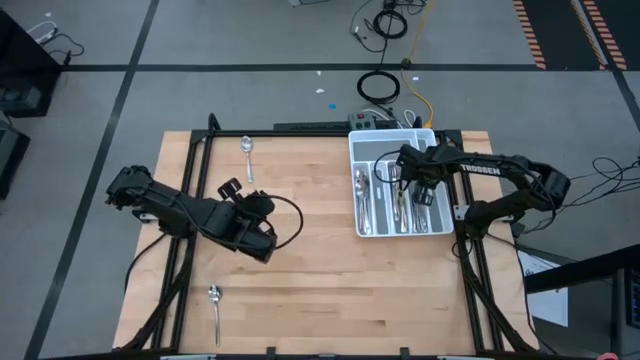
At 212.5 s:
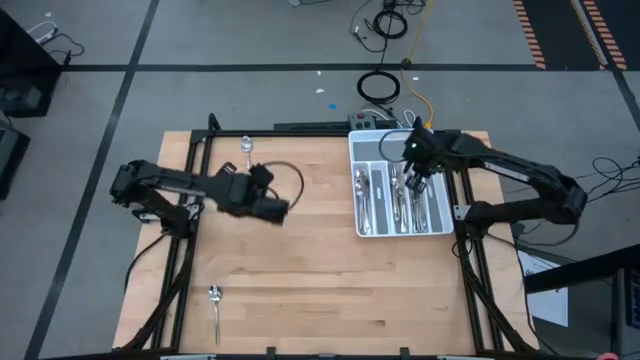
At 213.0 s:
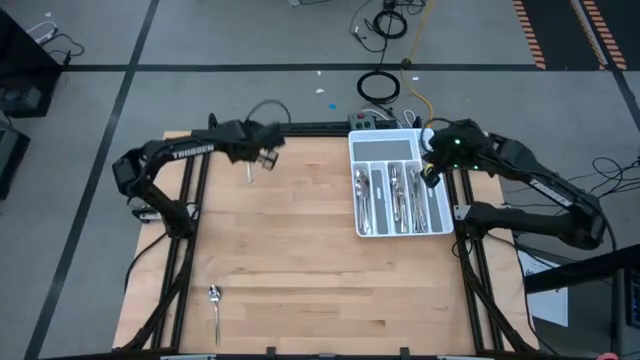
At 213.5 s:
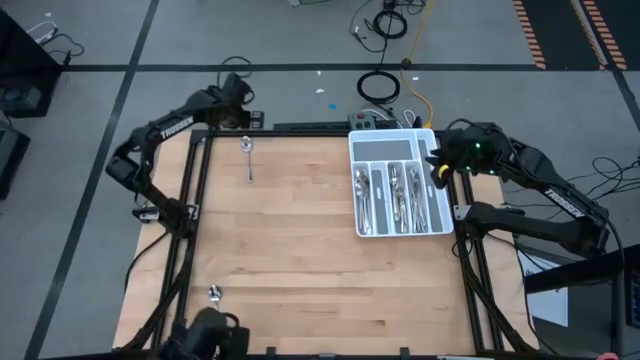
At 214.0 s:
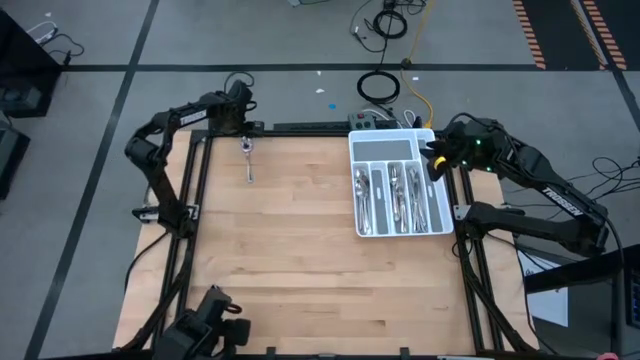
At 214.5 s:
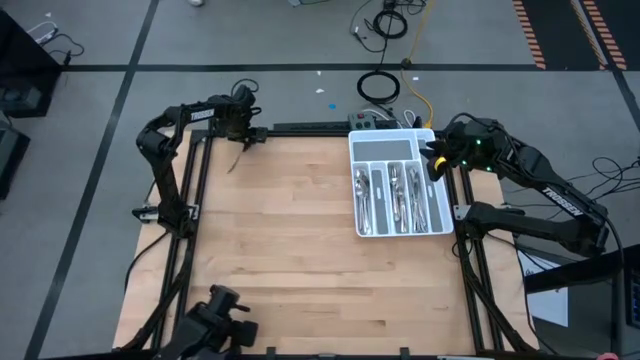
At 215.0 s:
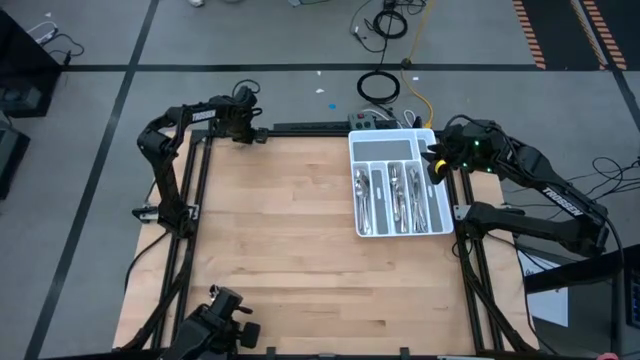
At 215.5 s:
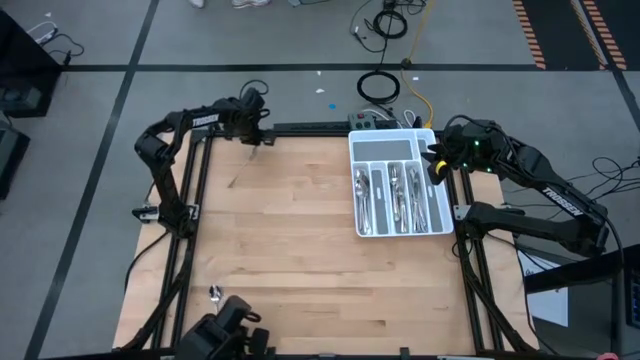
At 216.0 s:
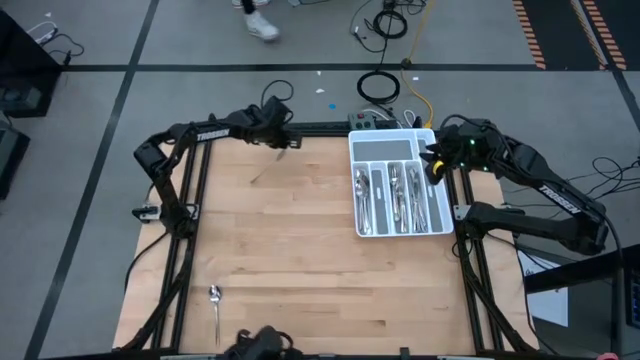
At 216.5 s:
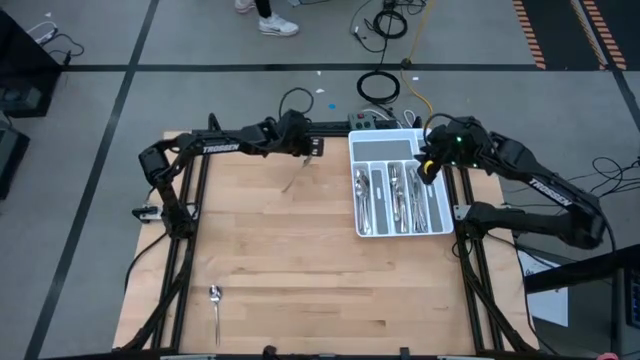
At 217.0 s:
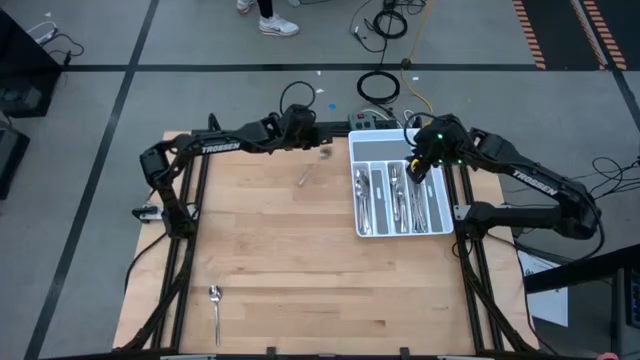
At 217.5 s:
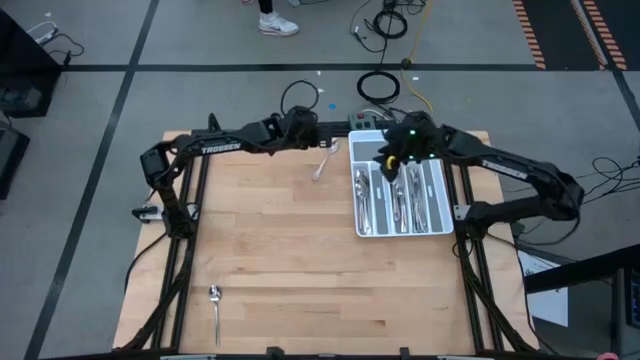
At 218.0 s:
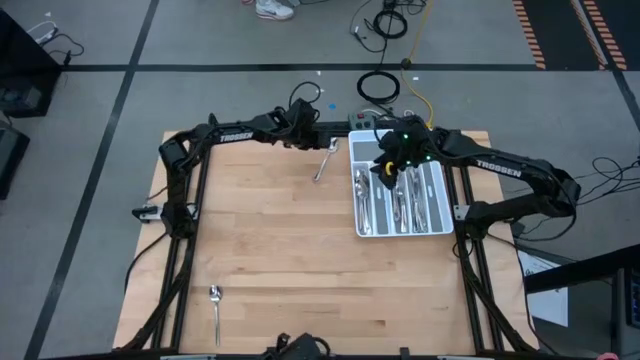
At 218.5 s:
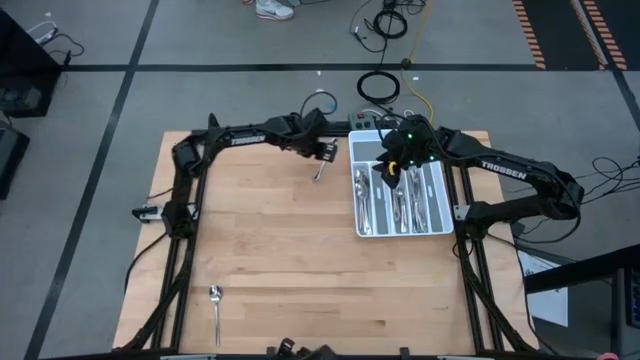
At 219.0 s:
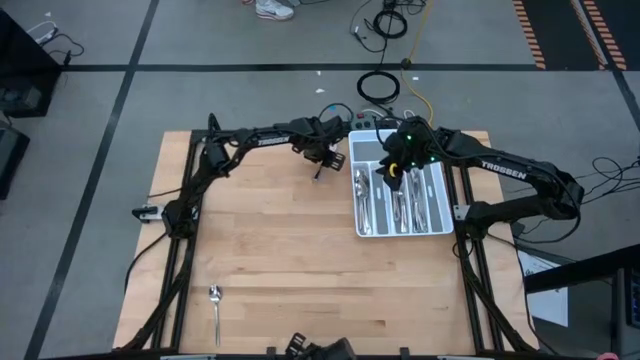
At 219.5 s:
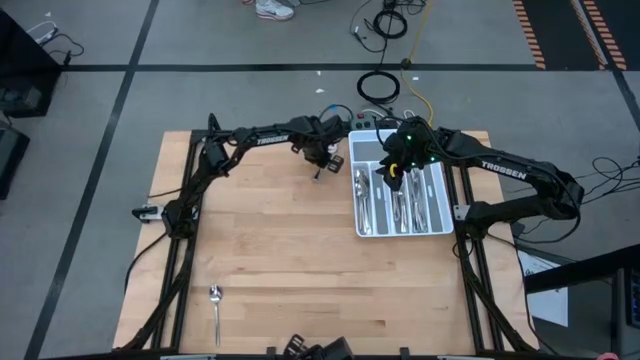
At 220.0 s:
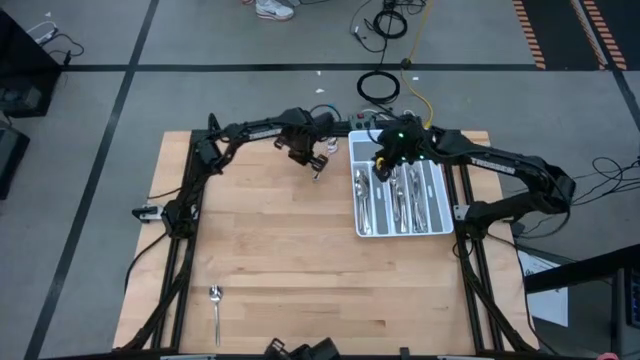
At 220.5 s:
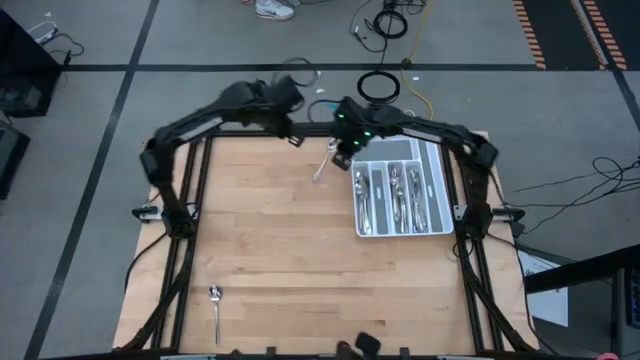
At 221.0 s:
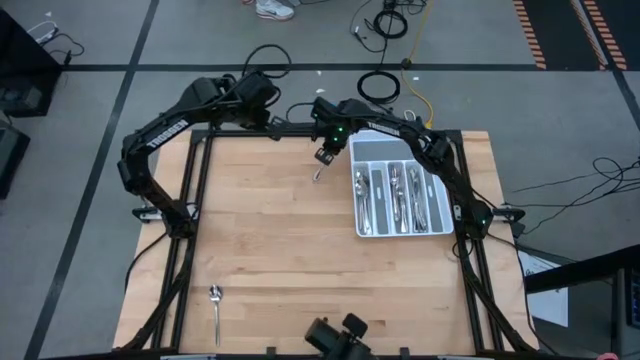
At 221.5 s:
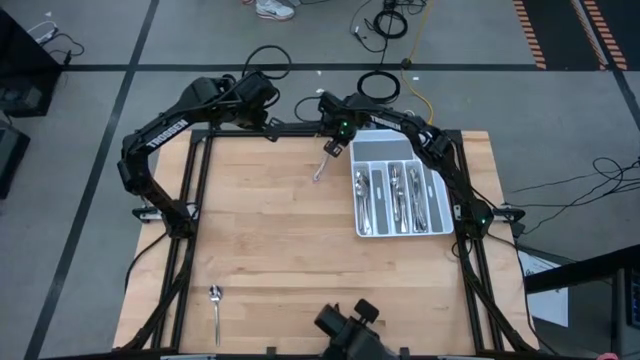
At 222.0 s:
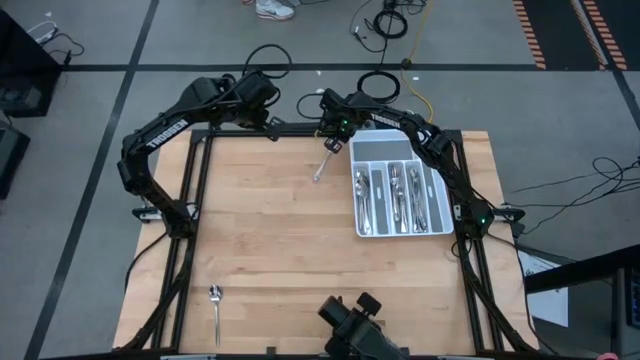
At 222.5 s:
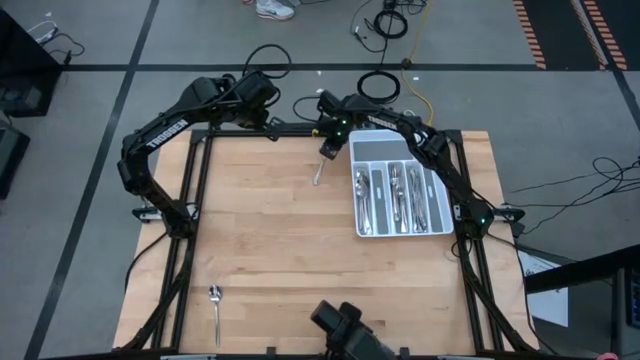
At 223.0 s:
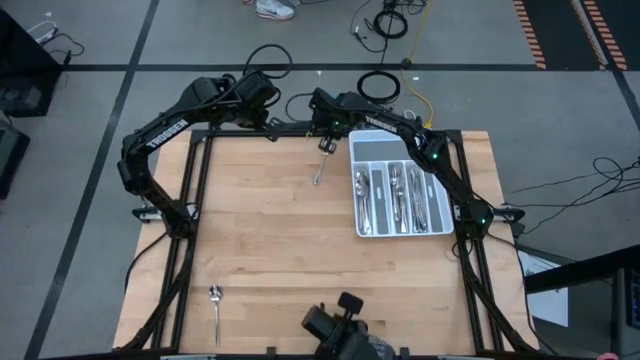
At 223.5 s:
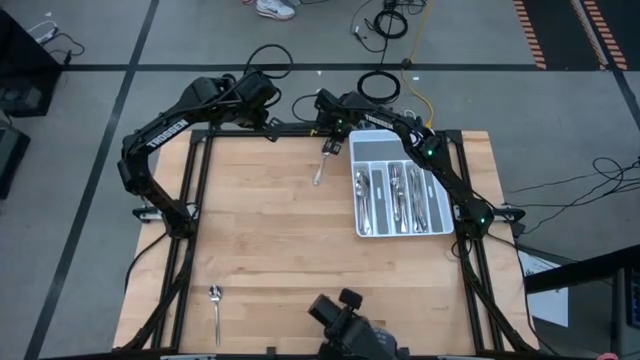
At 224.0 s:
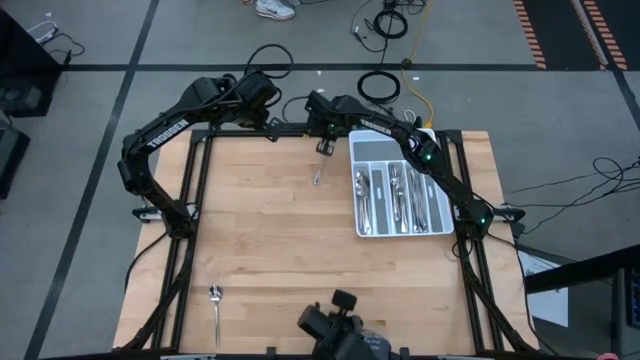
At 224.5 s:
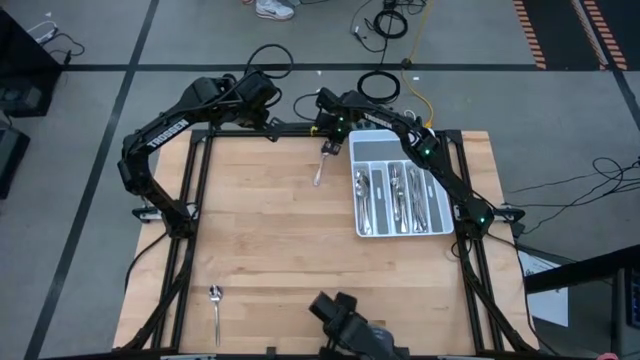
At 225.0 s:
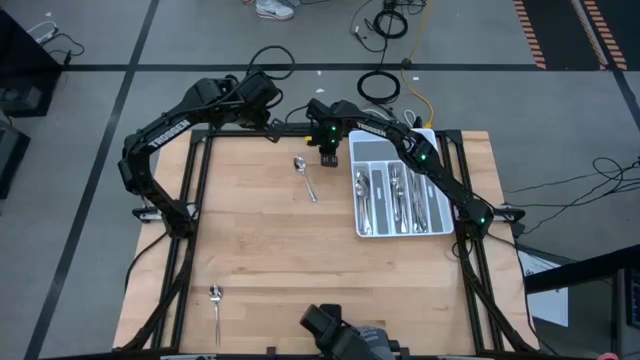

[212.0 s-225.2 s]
Task: Sort silverware
Put the silver spoon into the white silverware tray

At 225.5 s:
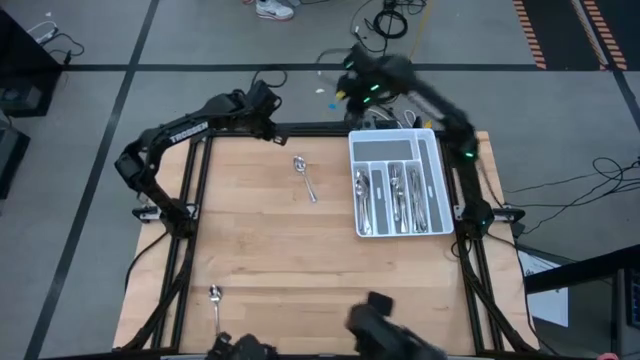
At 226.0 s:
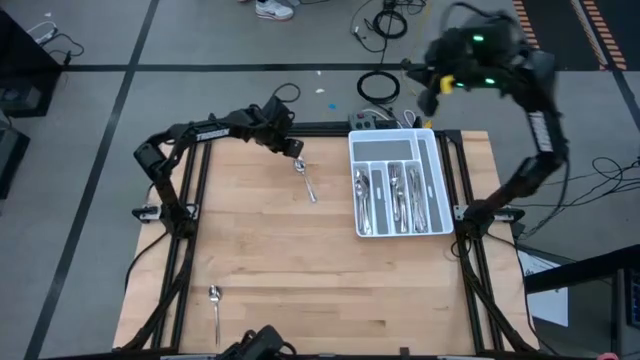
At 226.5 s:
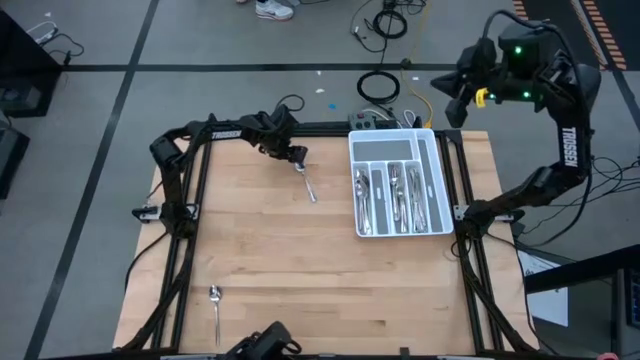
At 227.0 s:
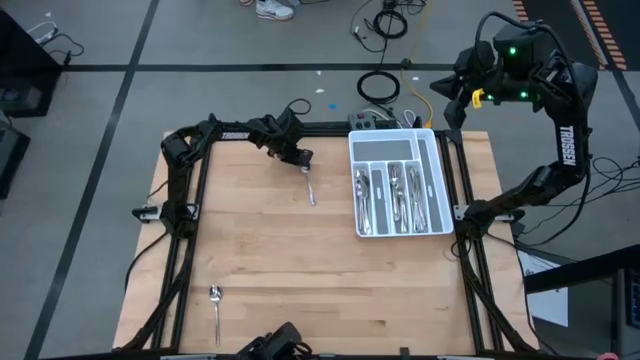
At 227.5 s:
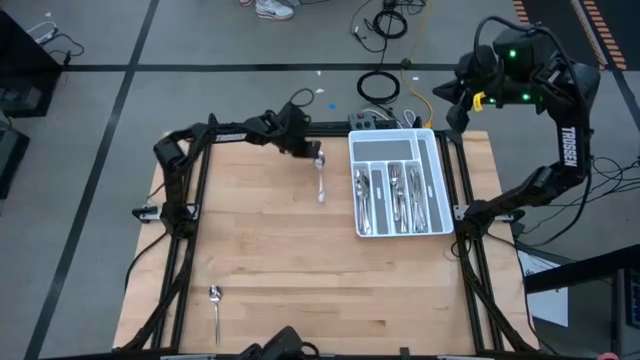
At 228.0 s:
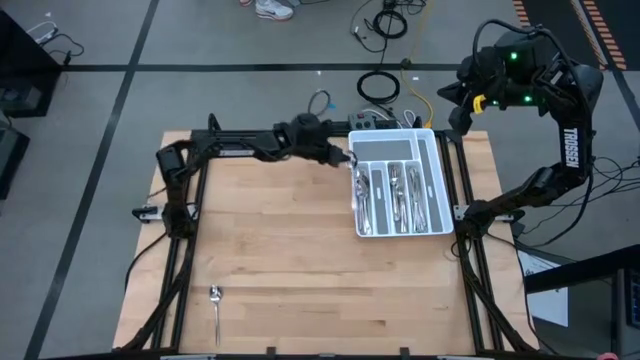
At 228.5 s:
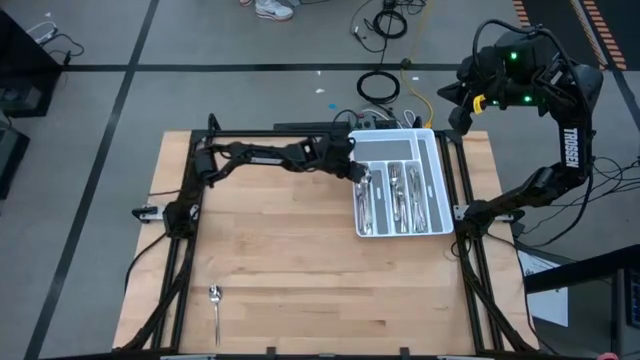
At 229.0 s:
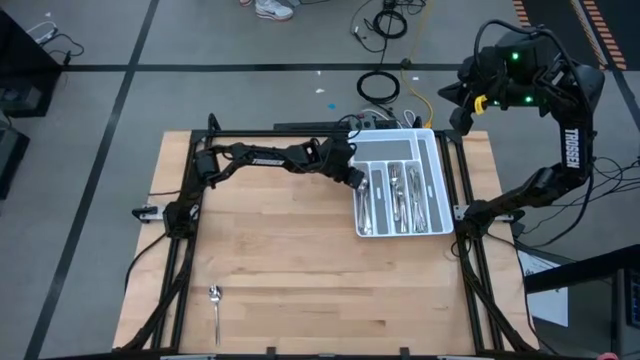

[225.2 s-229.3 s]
Put the silver spoon into the white silverware tray

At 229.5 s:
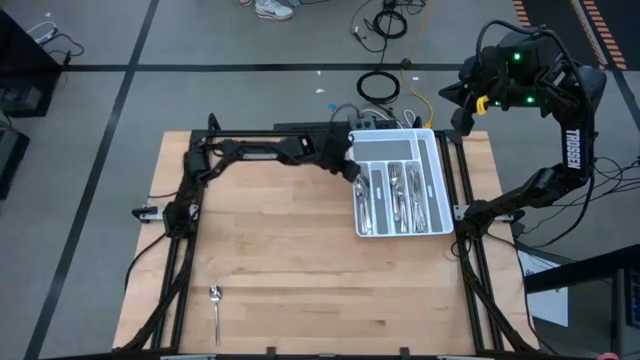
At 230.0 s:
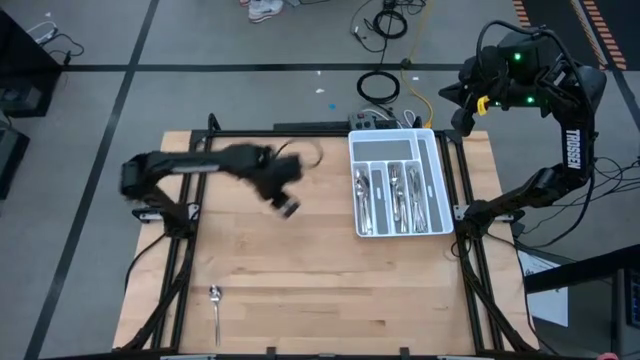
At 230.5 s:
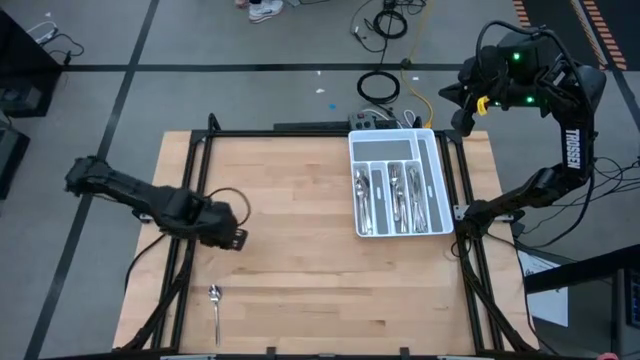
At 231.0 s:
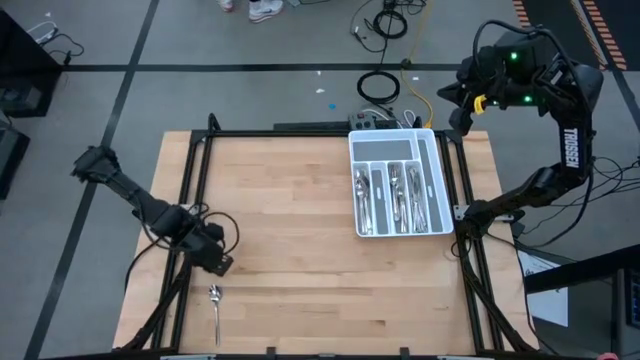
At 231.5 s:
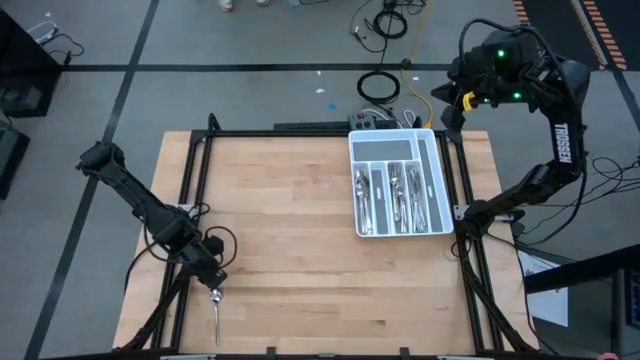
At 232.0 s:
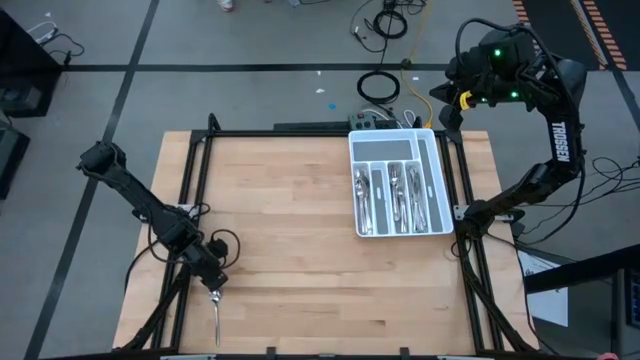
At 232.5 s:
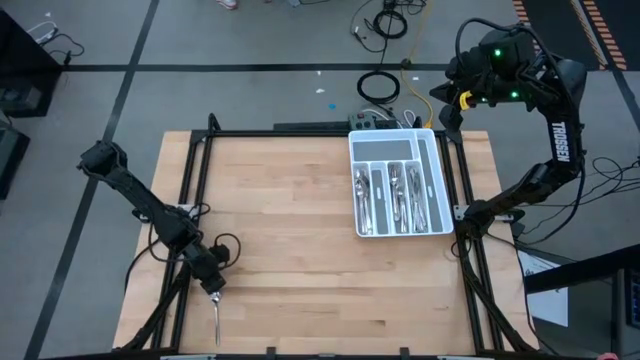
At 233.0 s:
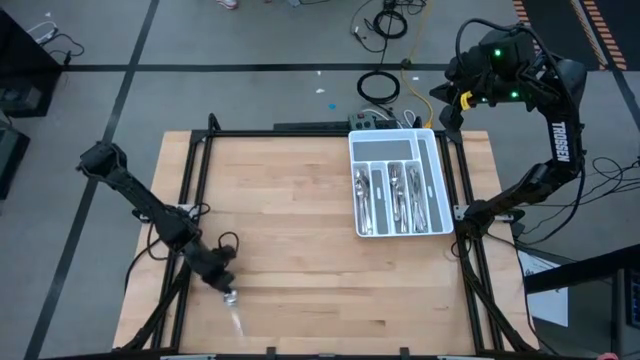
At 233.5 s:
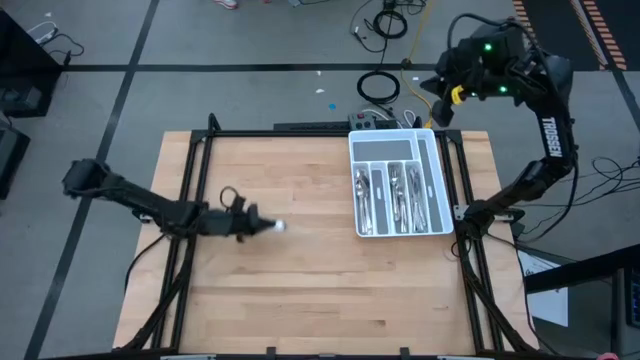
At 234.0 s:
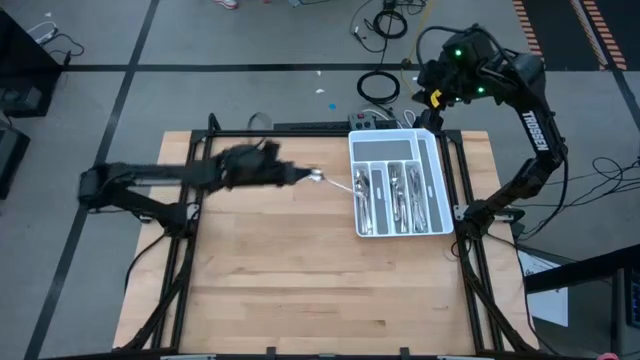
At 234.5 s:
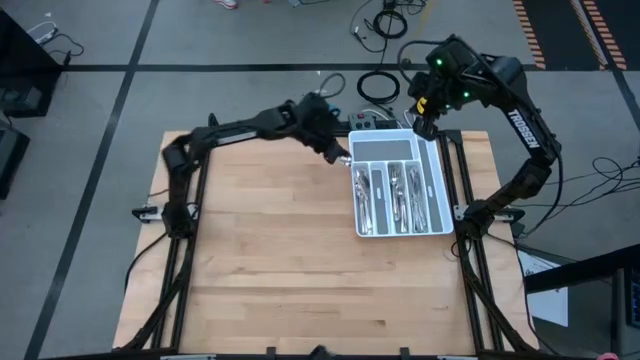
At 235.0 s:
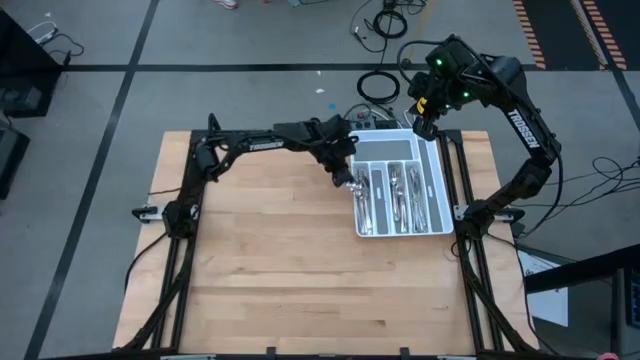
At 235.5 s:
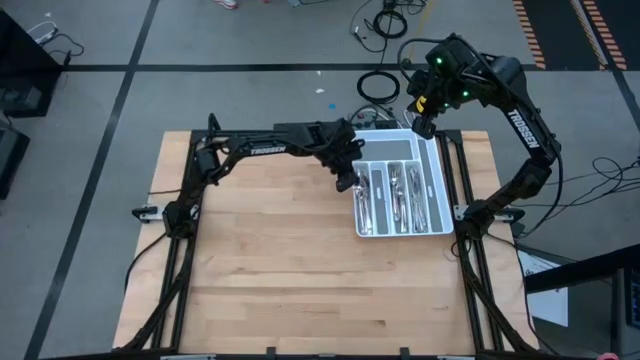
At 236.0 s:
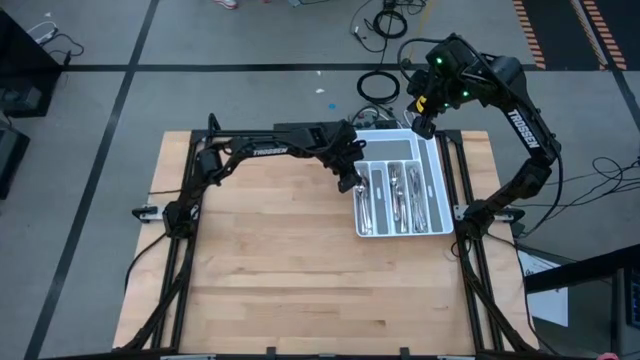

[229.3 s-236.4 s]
Put the silver spoon into the white silverware tray
